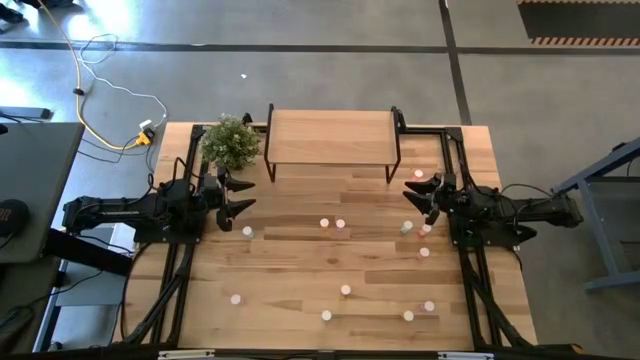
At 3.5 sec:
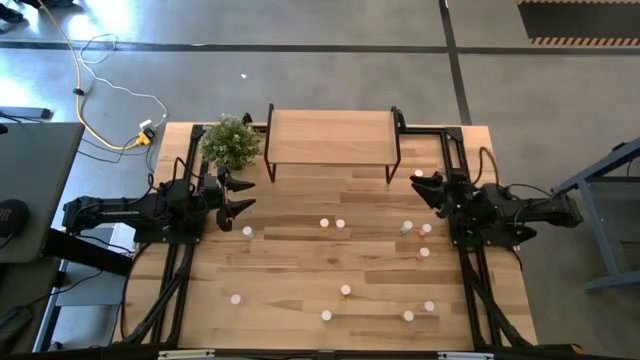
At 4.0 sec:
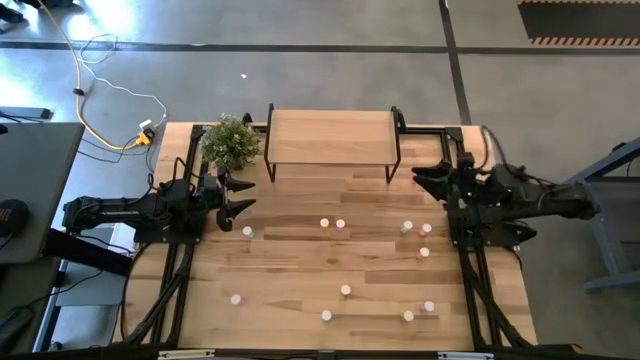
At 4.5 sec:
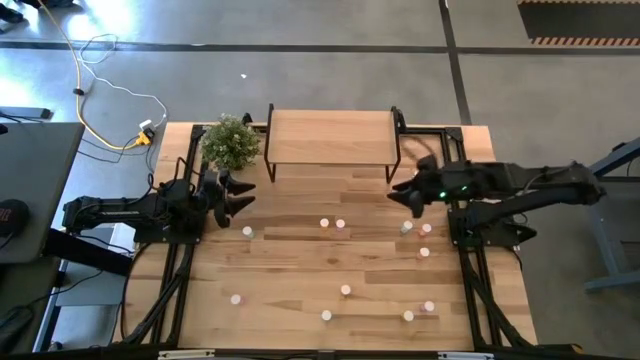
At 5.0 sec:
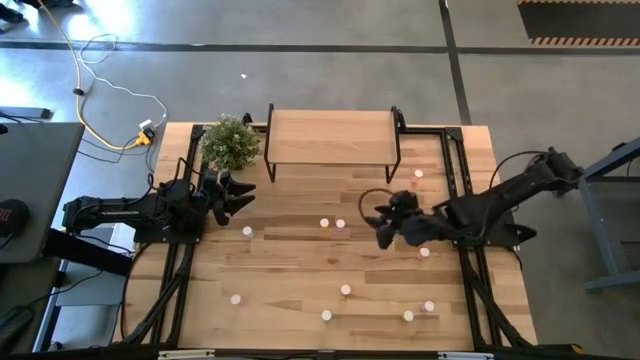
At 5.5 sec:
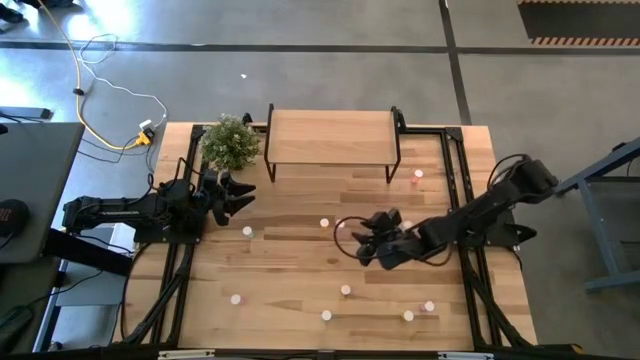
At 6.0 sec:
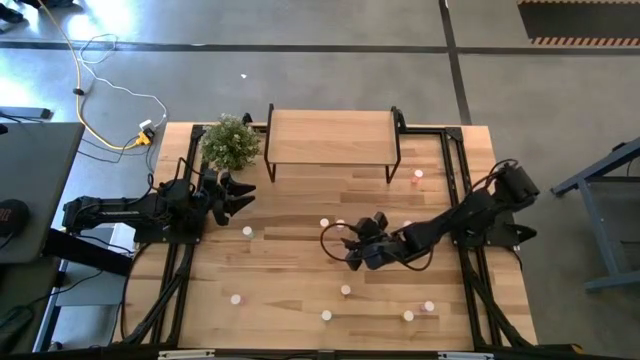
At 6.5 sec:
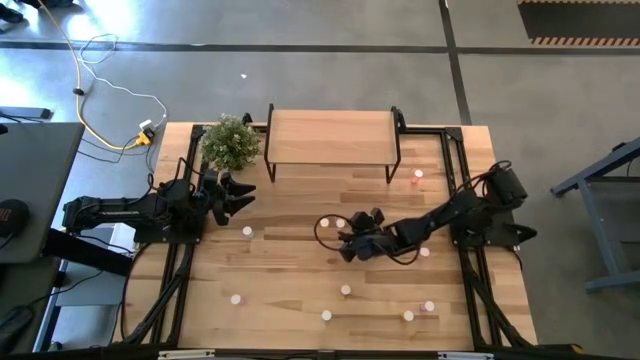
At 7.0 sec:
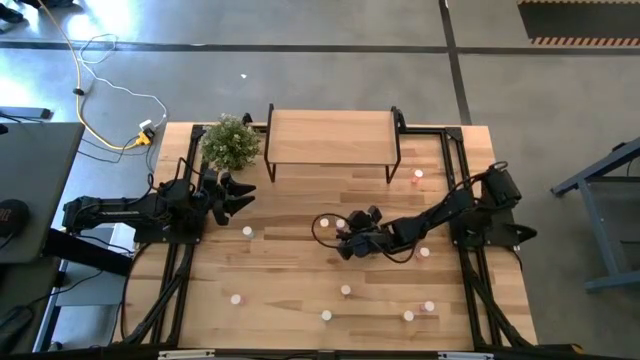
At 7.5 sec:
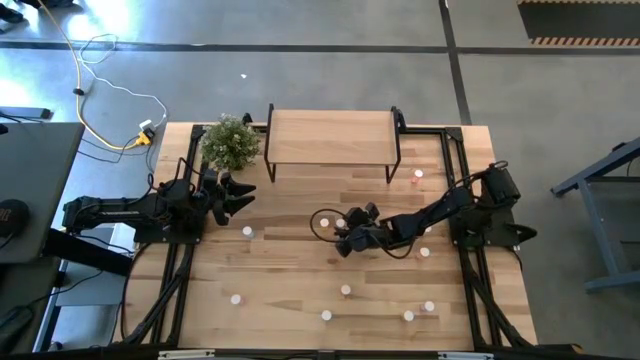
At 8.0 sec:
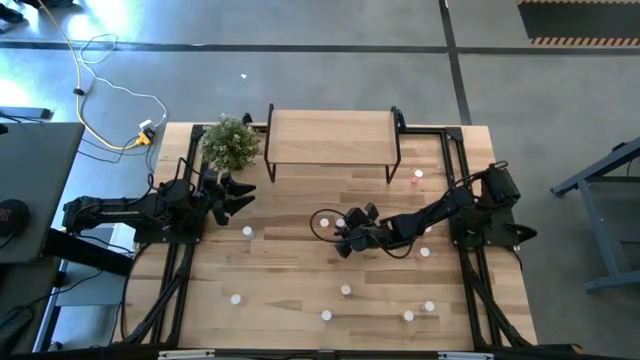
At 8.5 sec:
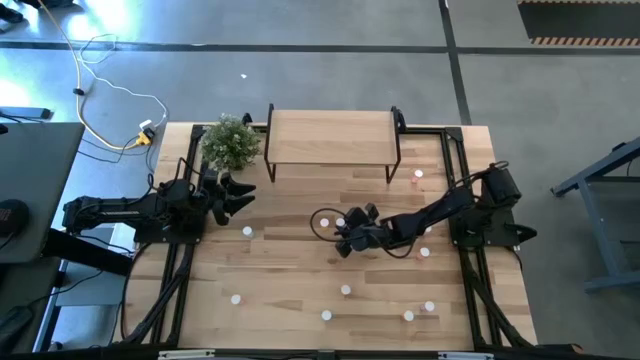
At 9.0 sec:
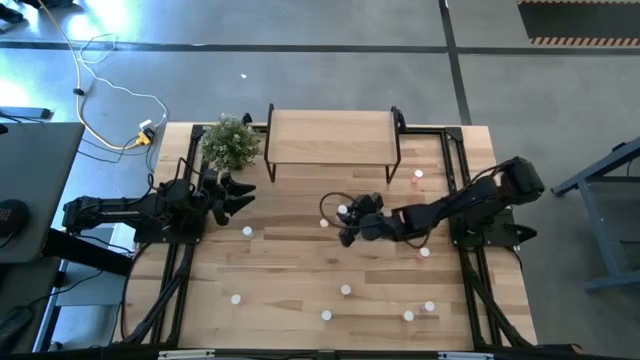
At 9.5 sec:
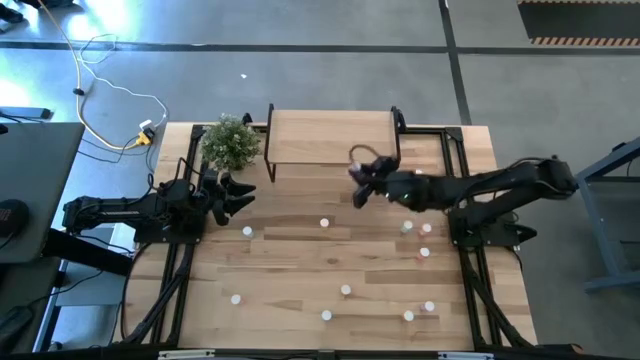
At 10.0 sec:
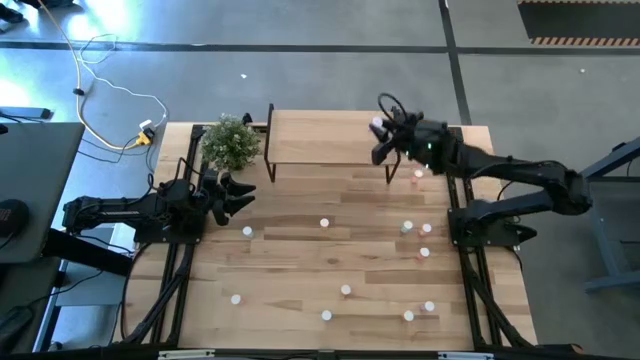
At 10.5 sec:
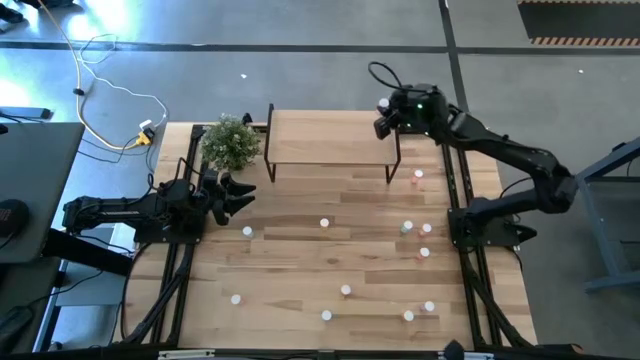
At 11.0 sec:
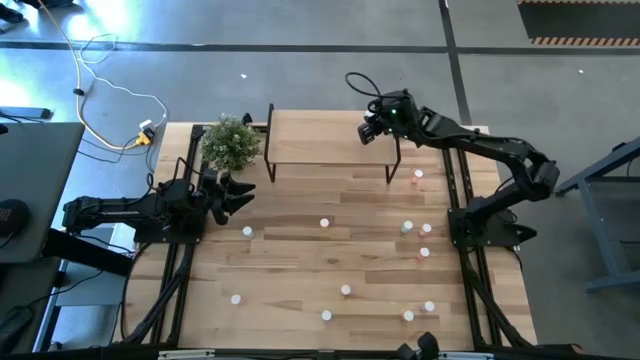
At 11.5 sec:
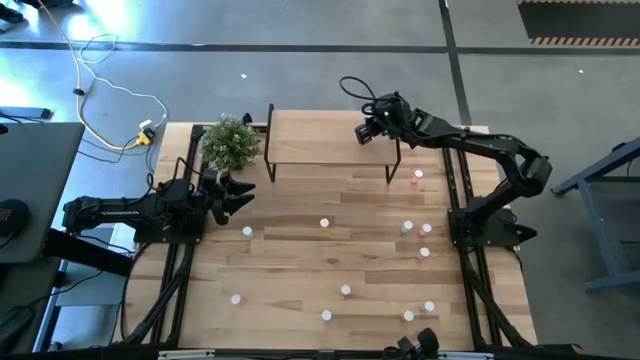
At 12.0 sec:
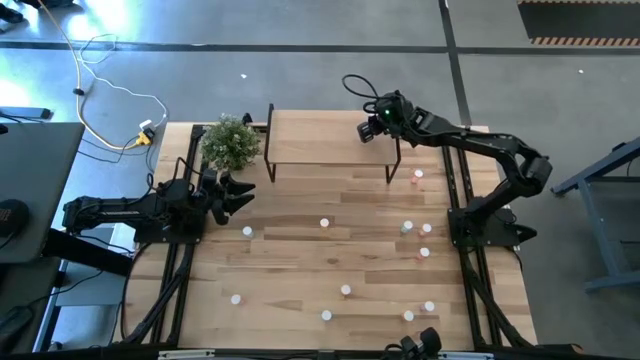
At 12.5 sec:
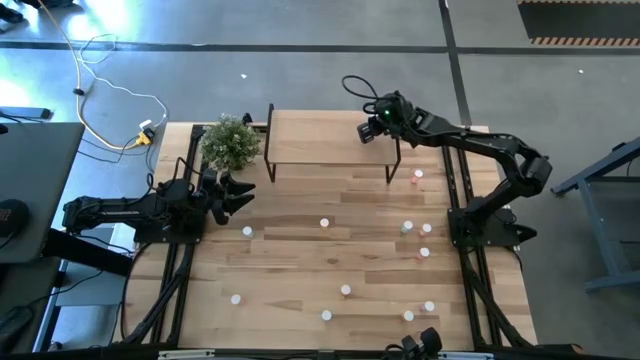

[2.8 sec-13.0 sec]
Task: Pick and place medicine bottles onto shelf by color
Put the top center violet pill bottle on the shelf

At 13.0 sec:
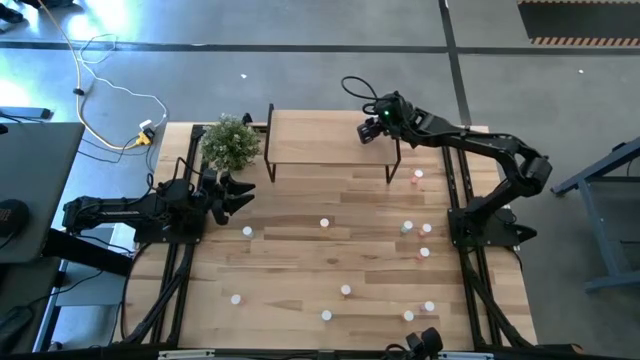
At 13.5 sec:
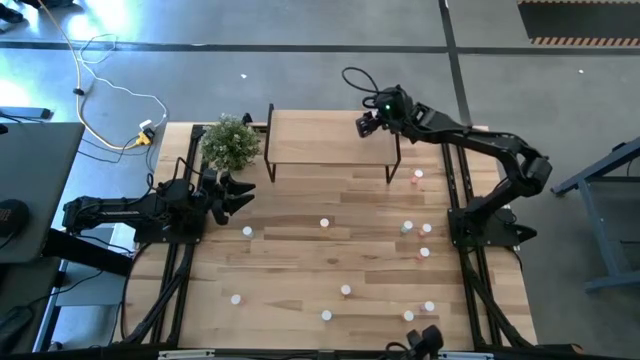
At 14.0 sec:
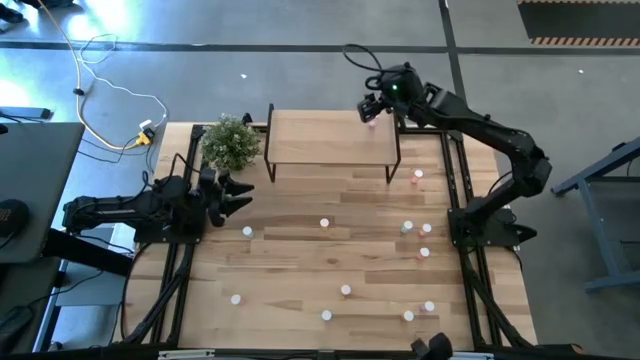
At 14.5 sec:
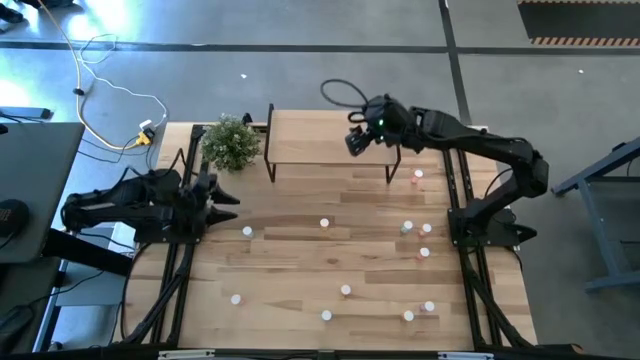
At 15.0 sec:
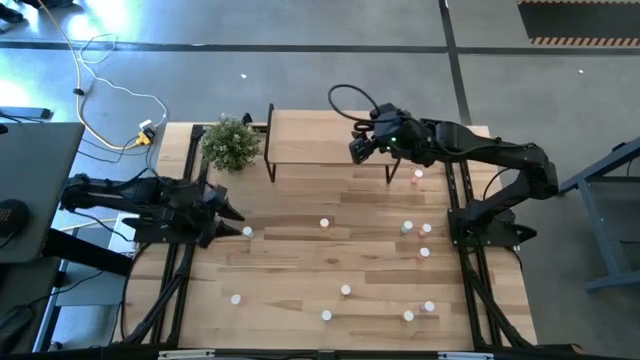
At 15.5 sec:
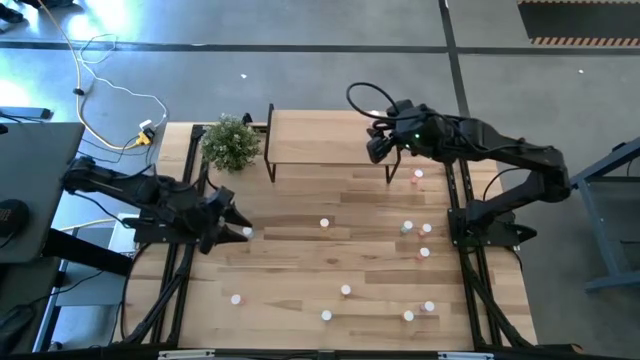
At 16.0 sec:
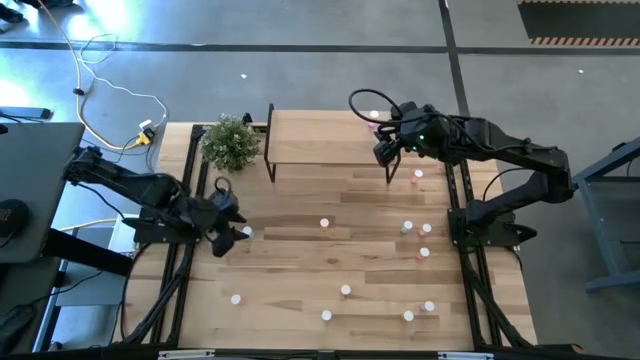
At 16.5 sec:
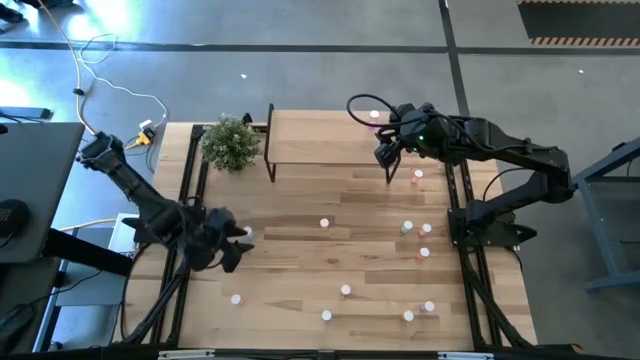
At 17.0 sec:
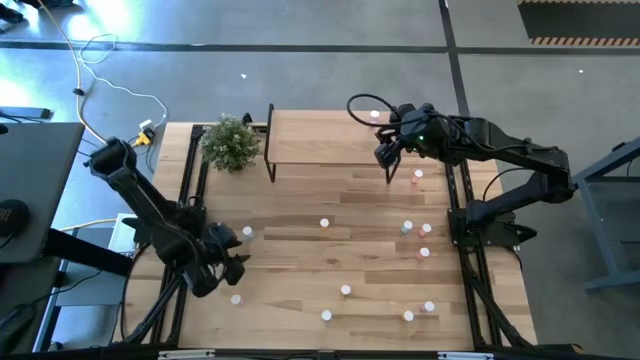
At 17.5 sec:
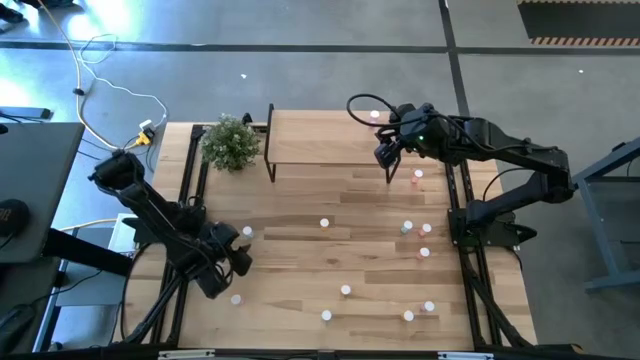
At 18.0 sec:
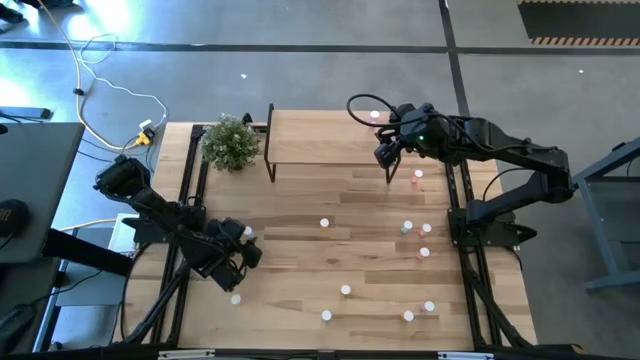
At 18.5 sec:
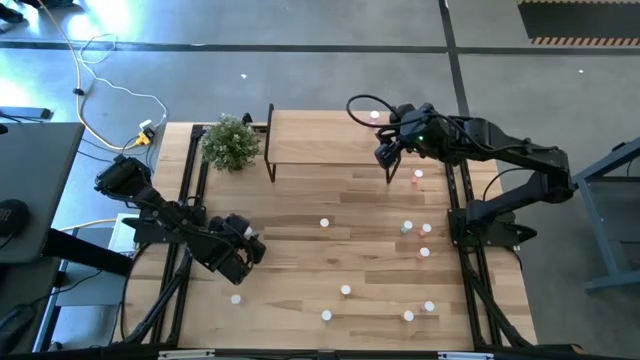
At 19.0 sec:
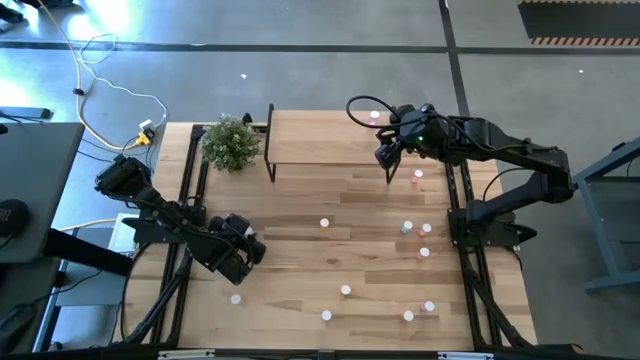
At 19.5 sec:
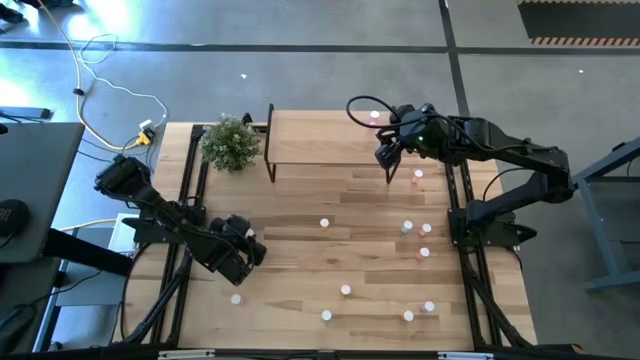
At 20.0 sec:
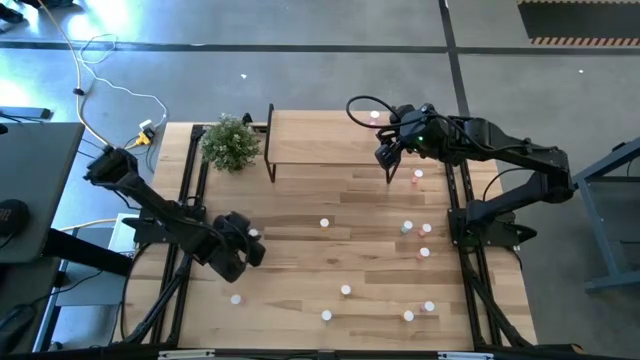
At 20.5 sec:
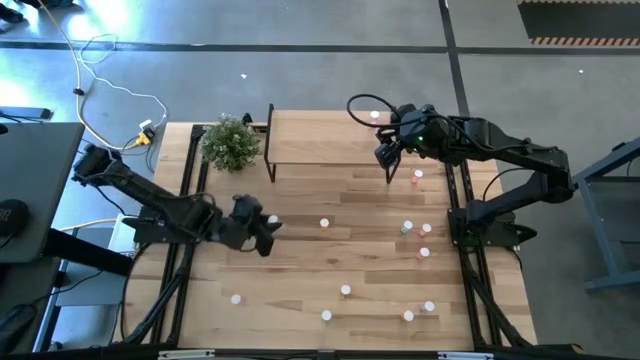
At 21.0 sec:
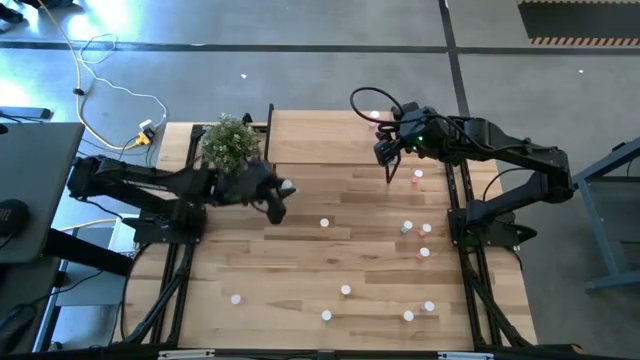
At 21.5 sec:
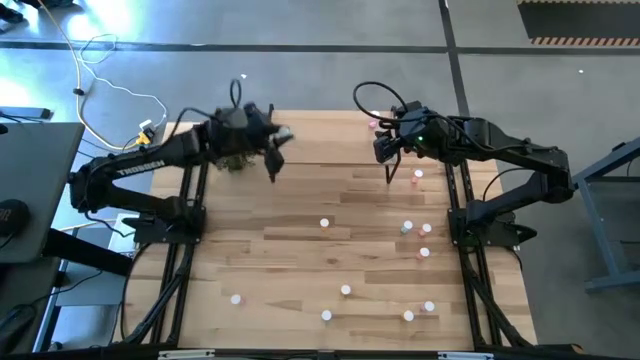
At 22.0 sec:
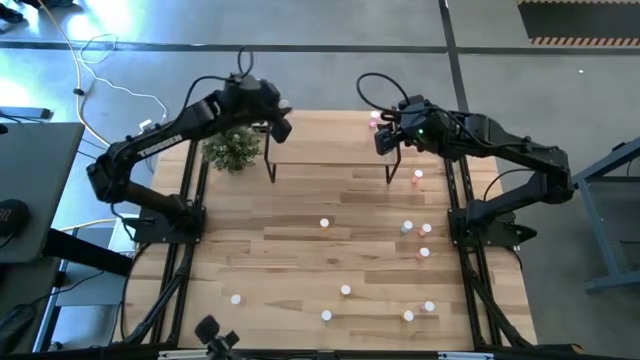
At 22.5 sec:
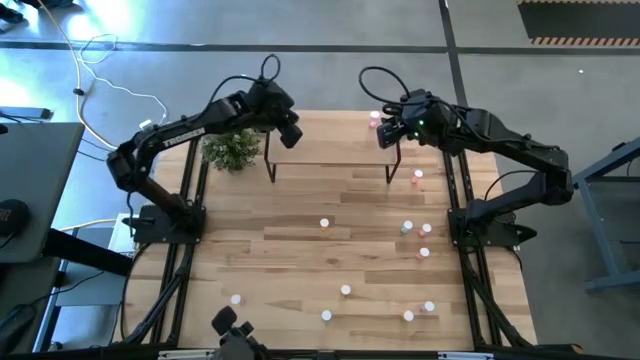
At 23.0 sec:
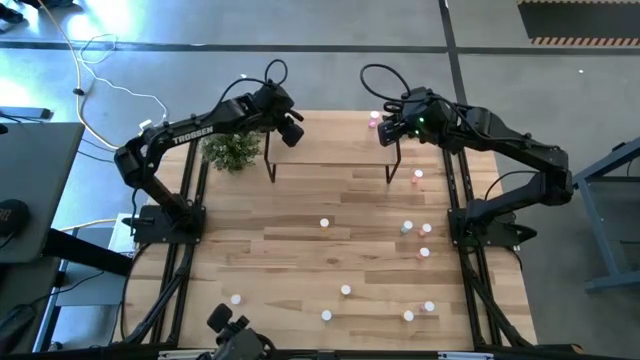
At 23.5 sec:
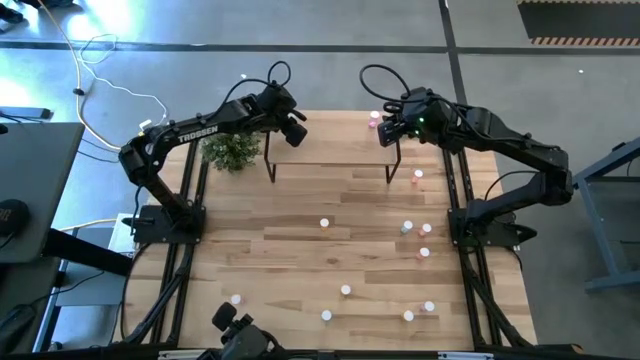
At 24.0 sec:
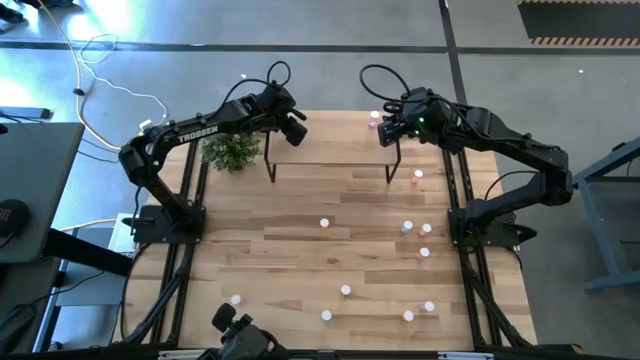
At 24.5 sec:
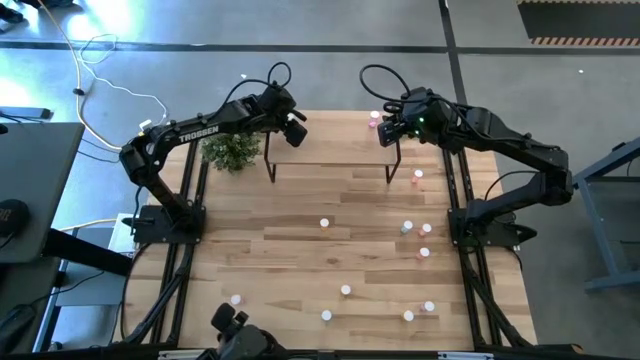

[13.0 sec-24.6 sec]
Put the top left blue pill bottle on the shelf
